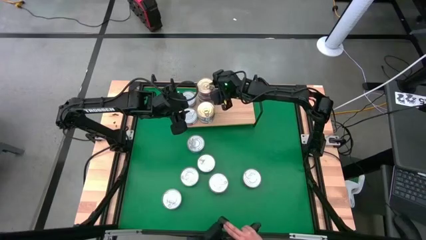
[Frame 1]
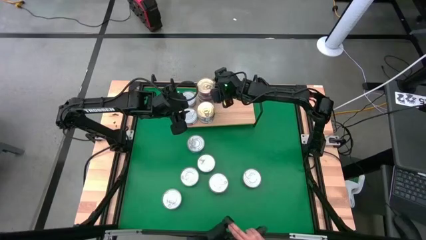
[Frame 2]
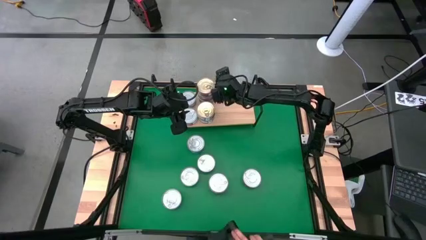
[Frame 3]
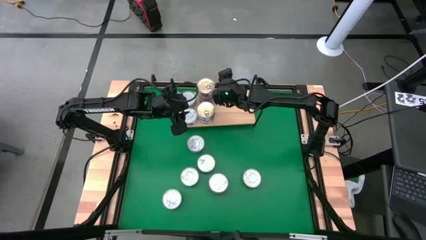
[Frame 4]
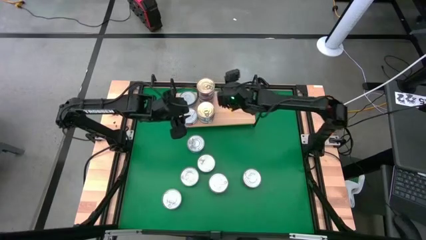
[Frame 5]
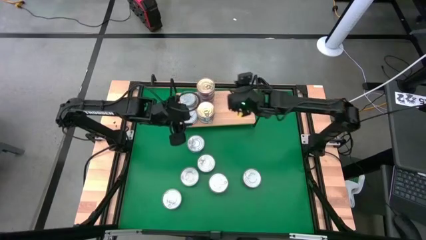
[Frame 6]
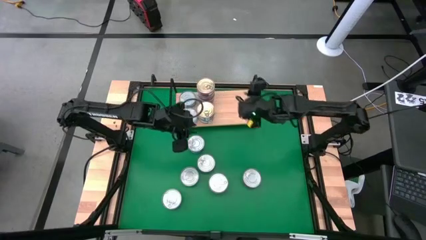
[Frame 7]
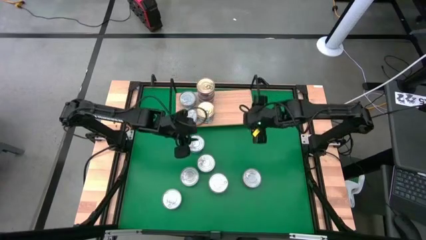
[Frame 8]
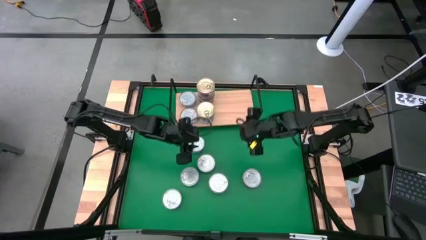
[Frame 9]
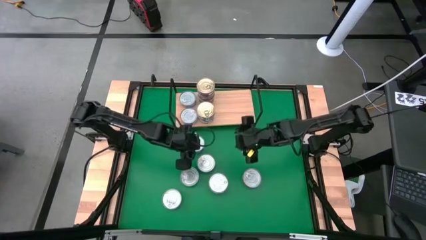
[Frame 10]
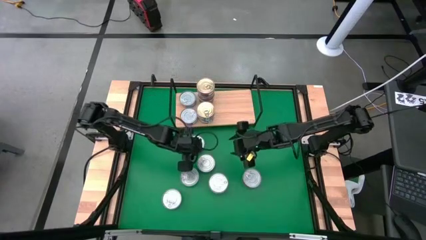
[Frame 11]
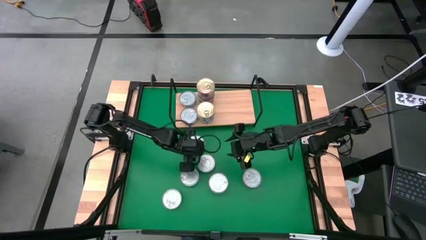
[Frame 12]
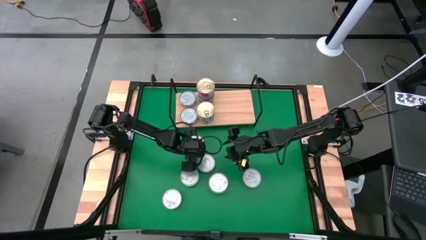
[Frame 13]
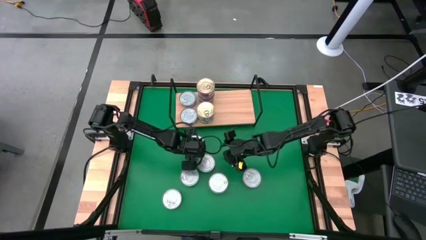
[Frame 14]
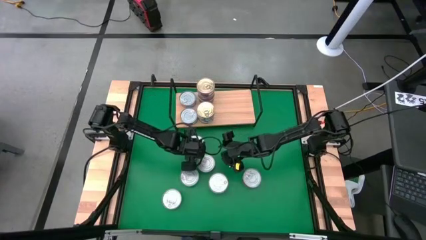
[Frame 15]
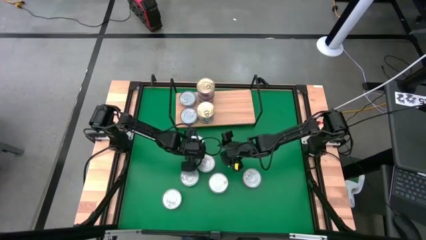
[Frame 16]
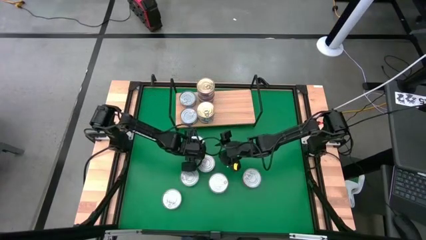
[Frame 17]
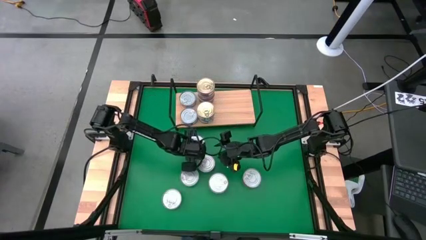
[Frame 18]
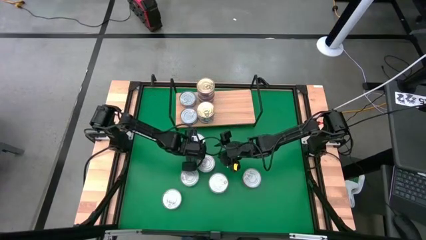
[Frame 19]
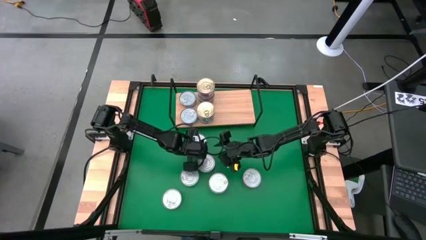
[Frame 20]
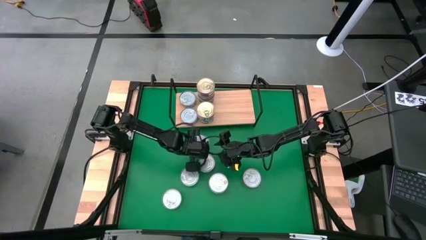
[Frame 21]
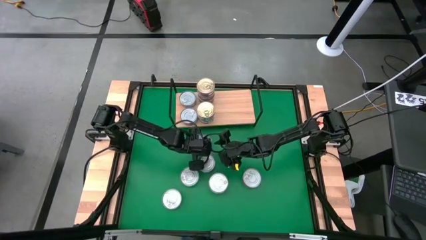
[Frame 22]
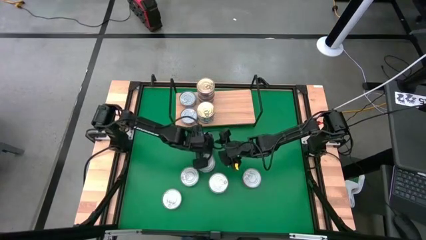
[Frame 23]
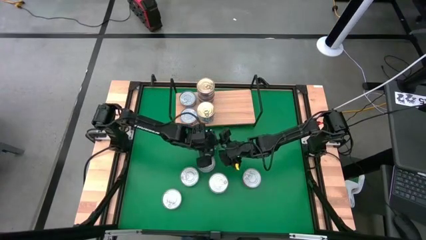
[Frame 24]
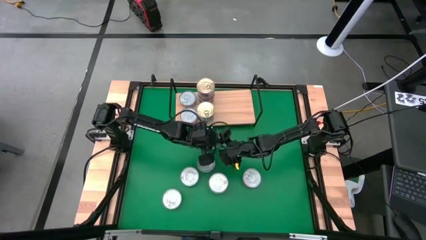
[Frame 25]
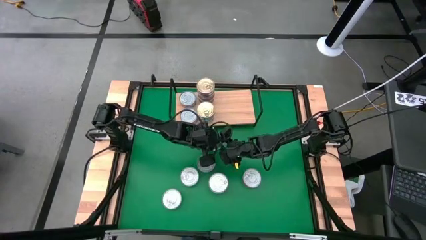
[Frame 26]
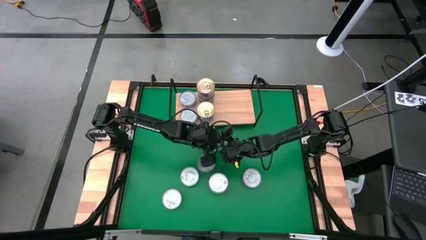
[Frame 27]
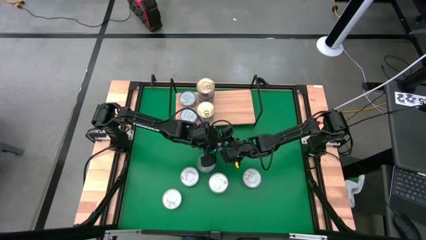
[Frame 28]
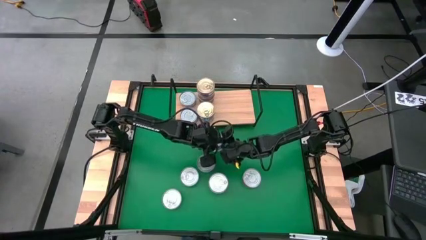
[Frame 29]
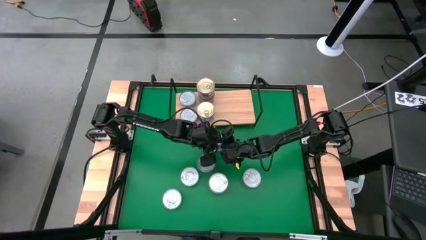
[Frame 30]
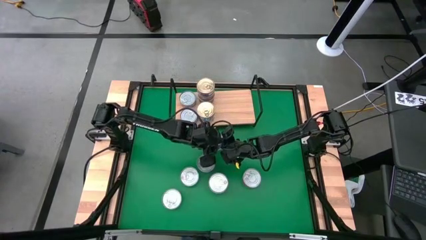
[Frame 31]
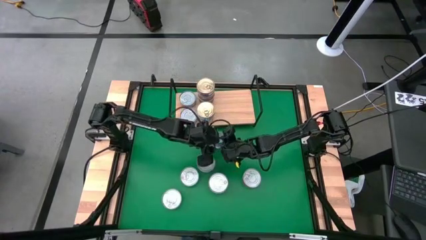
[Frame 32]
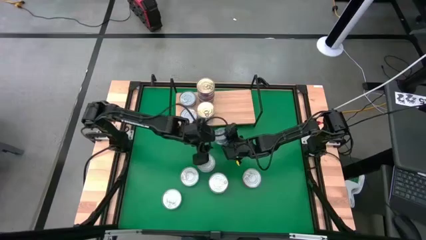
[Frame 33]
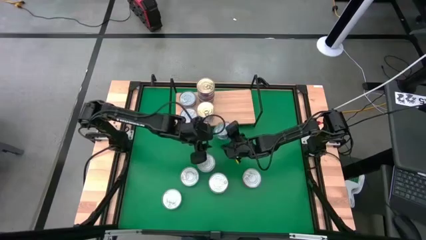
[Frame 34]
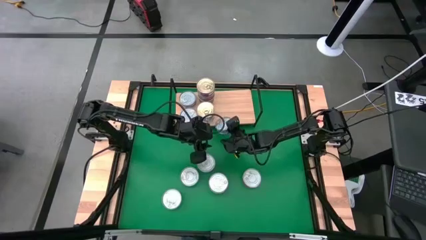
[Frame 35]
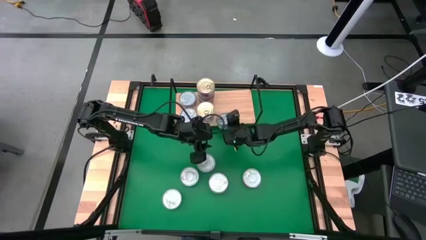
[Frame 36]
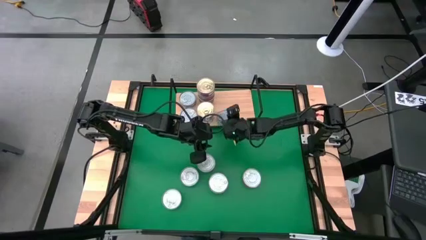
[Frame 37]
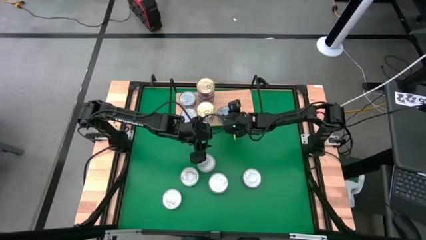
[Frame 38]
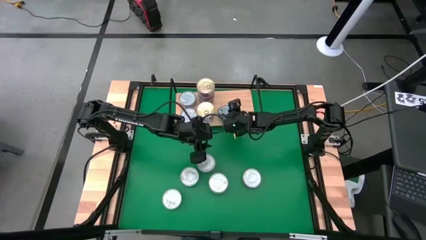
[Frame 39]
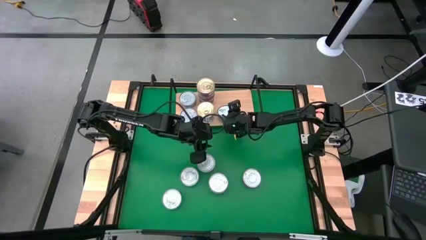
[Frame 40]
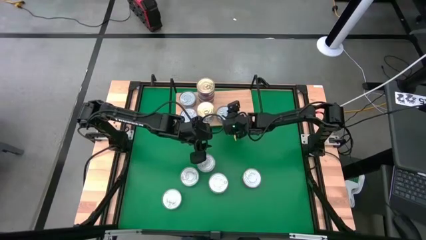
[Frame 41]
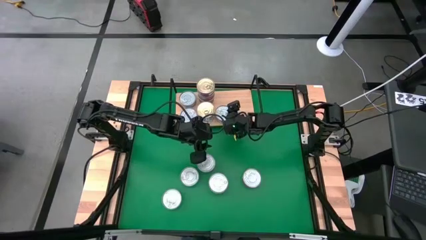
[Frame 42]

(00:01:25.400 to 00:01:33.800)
Task: Stack canned seafood by type on shelf
Put the green tuna can on the shelf

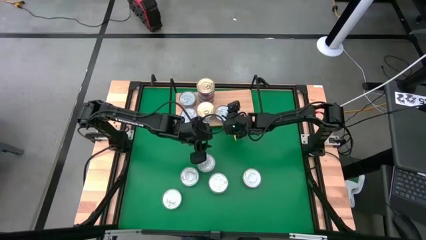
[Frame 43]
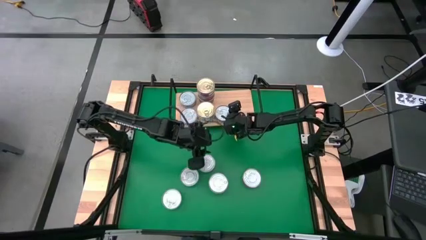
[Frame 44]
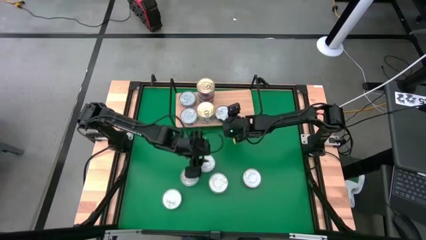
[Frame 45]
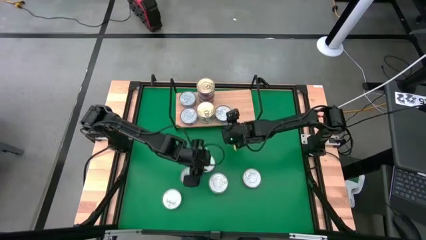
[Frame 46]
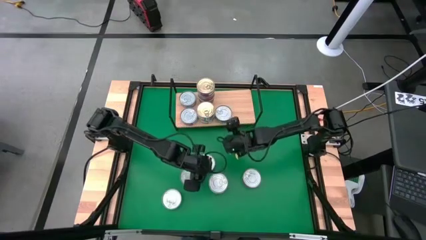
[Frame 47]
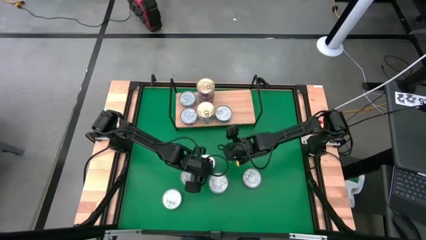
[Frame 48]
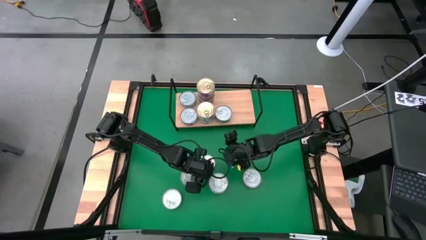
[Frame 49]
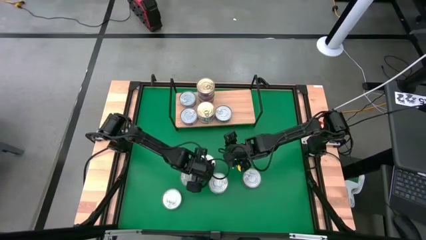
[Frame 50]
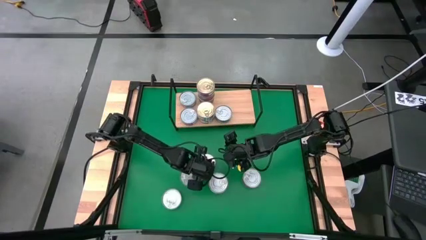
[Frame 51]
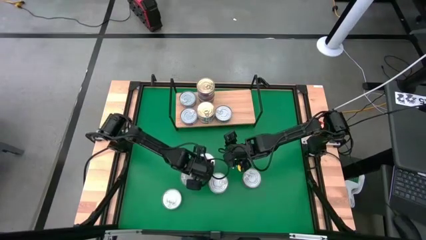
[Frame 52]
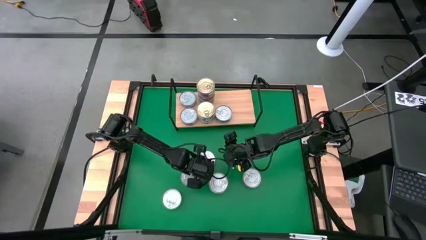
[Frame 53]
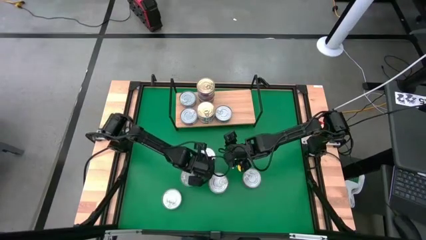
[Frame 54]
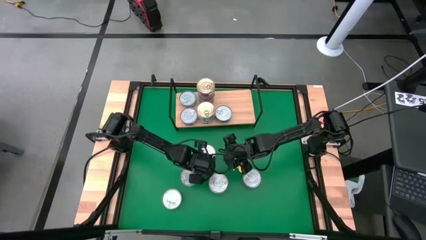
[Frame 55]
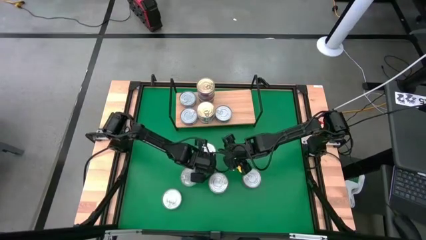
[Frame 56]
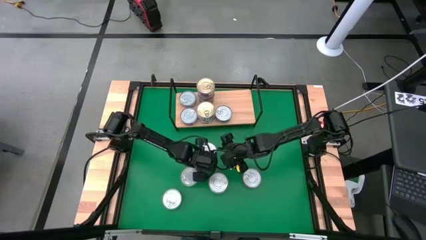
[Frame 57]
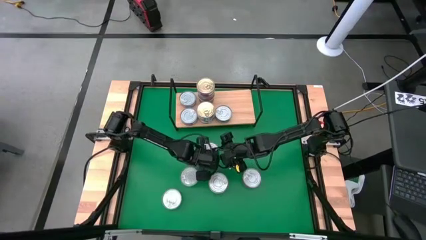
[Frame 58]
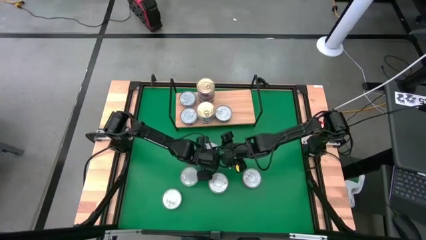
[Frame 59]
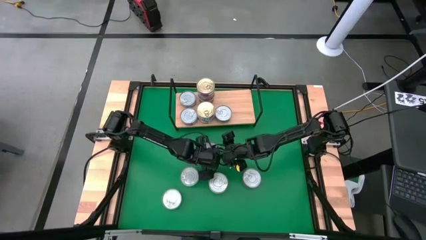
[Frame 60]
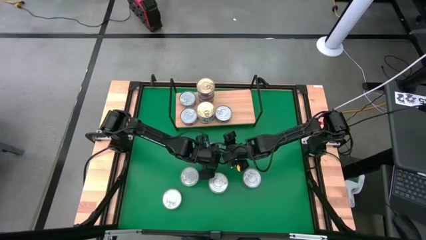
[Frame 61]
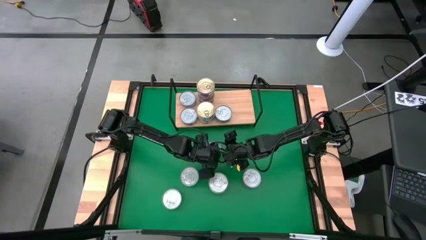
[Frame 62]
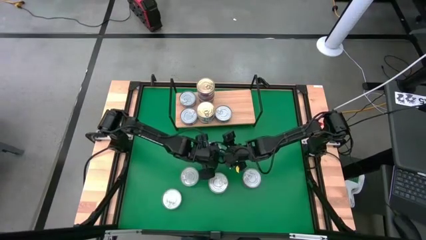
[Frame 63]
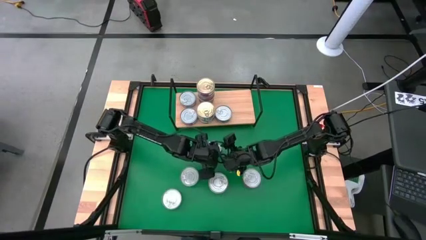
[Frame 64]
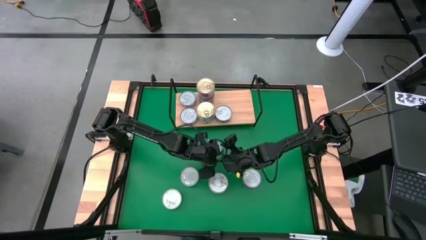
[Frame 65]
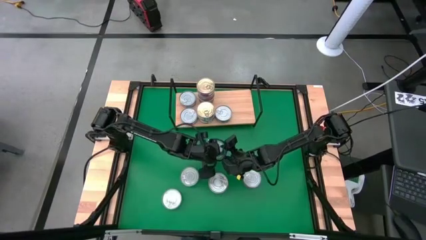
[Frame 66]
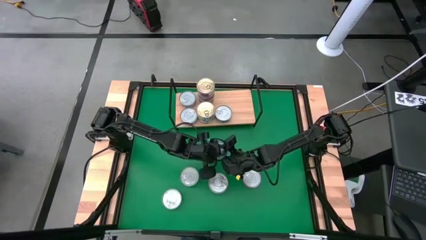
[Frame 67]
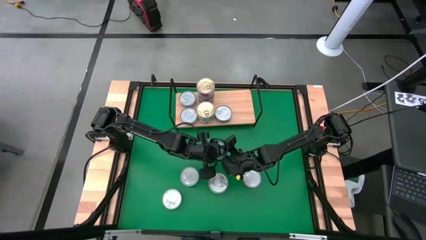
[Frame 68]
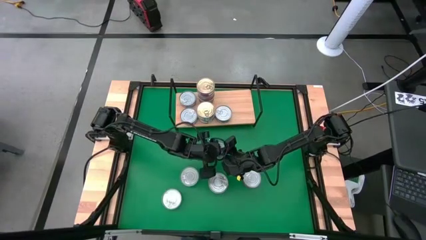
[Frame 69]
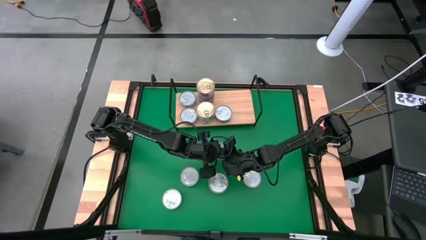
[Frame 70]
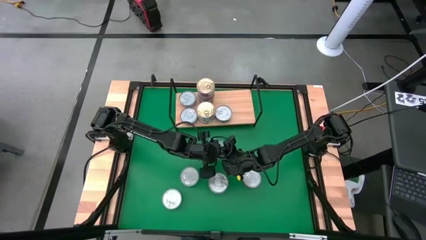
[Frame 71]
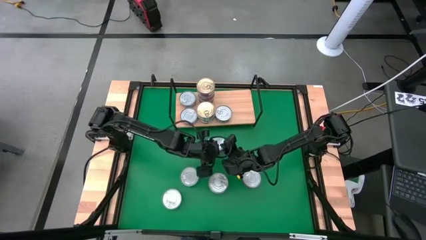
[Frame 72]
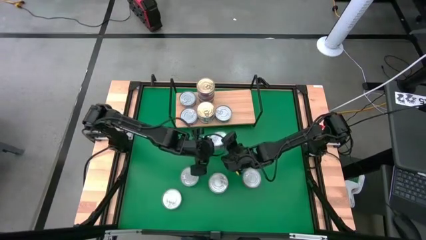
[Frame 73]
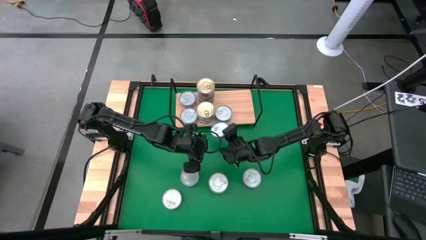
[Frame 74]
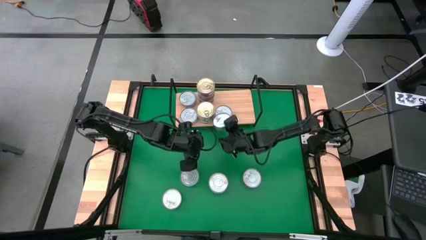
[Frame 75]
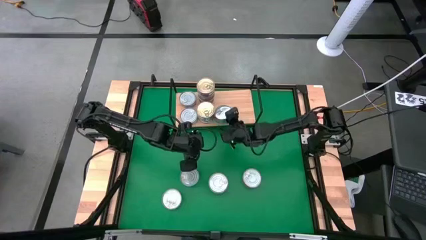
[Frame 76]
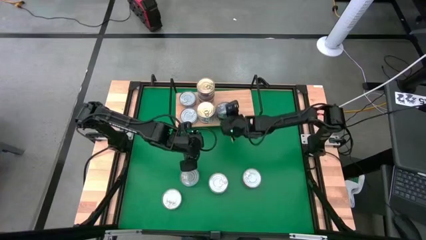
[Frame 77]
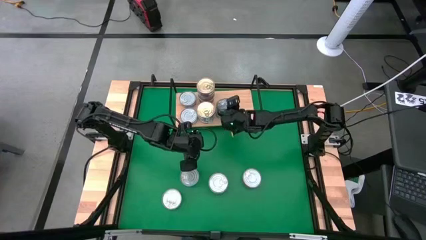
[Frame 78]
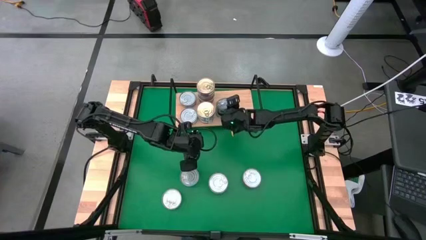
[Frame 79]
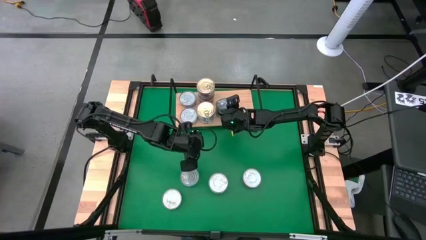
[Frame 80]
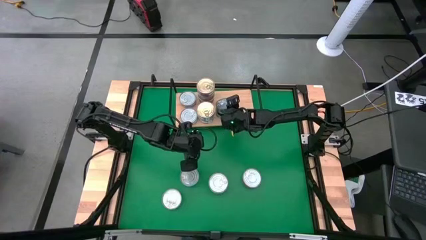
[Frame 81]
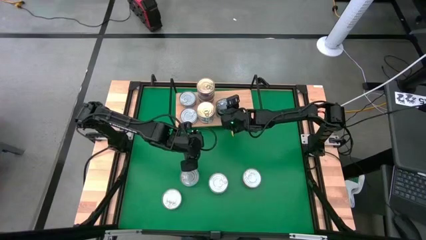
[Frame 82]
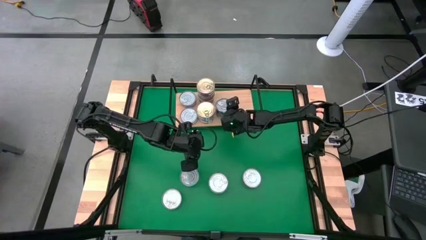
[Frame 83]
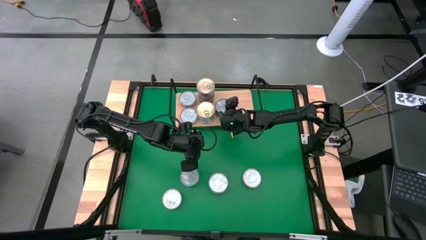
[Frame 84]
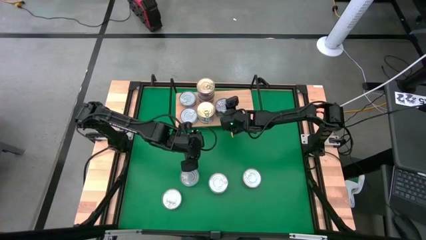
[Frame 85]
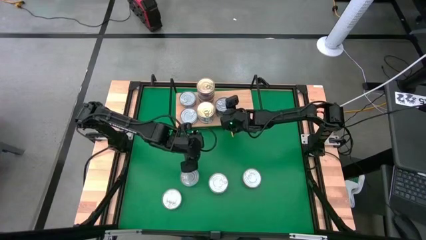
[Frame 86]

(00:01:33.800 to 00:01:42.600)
Stack the green tuna can on top of the green tuna can on the shelf
